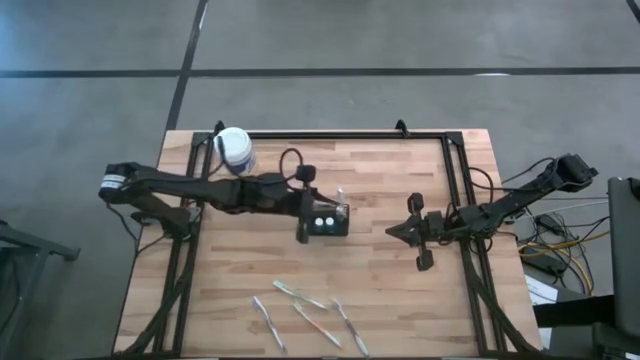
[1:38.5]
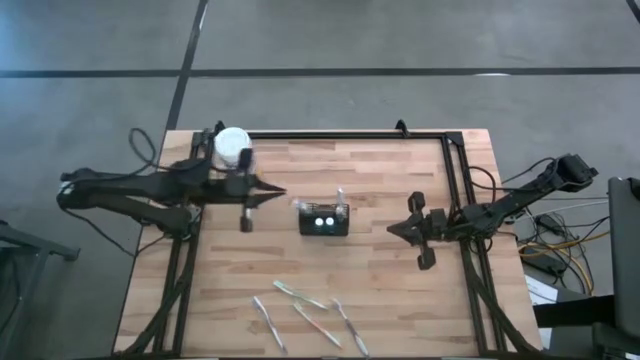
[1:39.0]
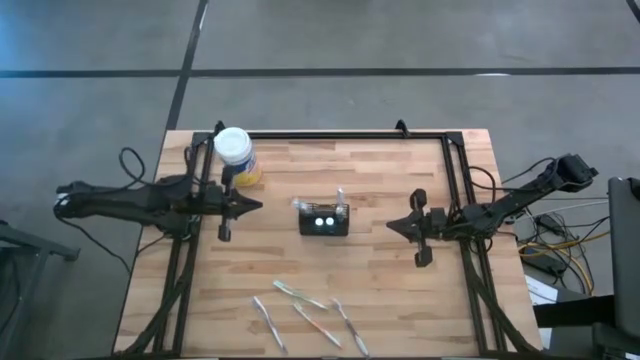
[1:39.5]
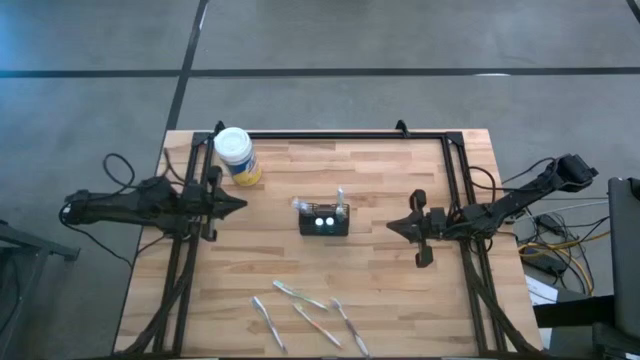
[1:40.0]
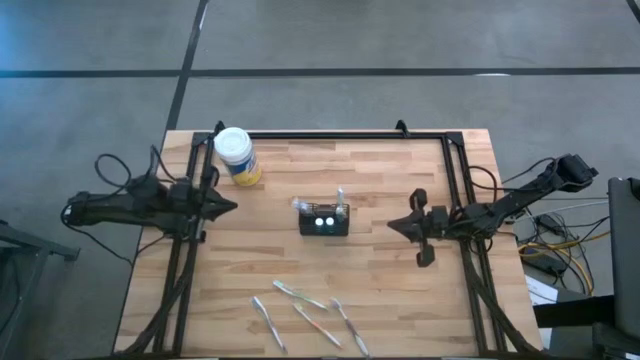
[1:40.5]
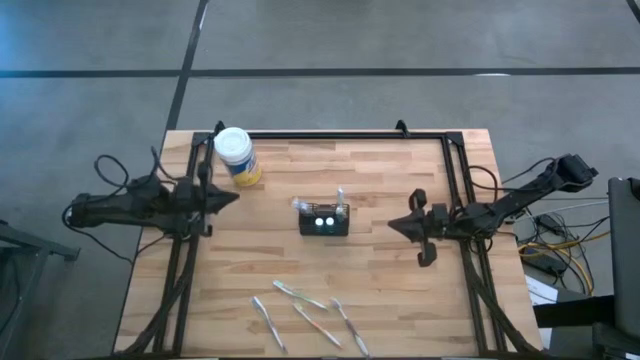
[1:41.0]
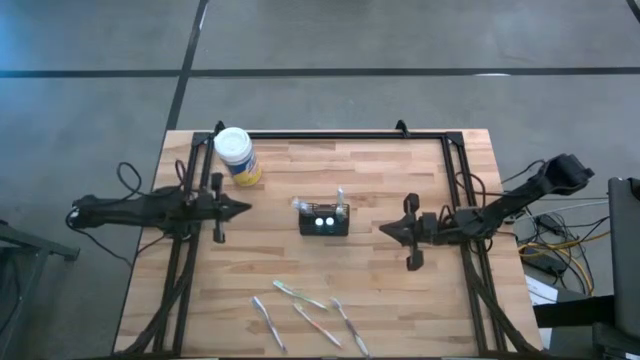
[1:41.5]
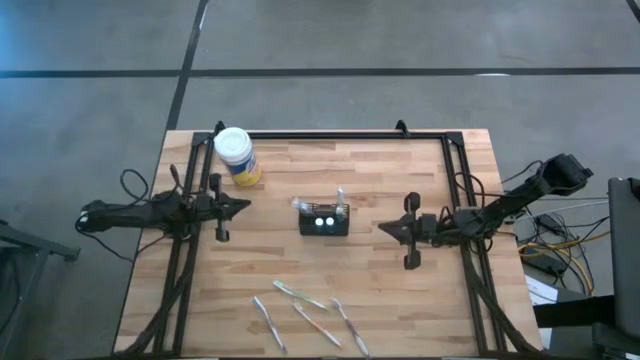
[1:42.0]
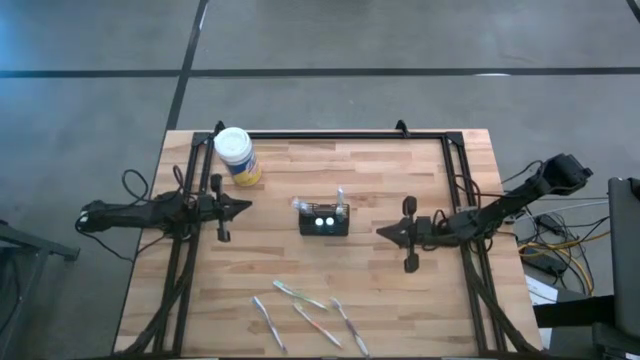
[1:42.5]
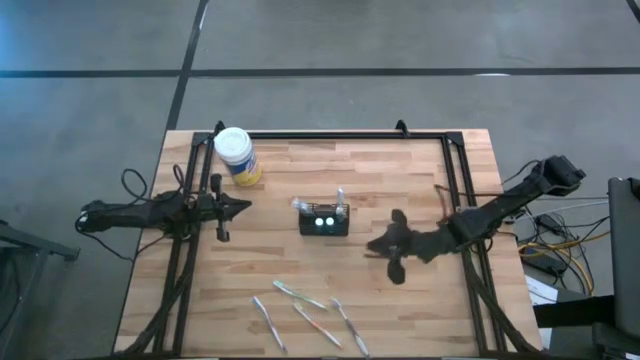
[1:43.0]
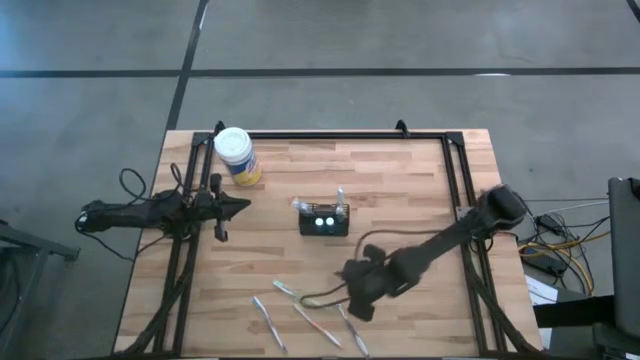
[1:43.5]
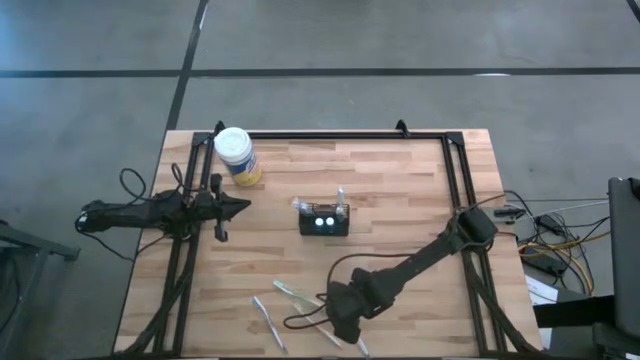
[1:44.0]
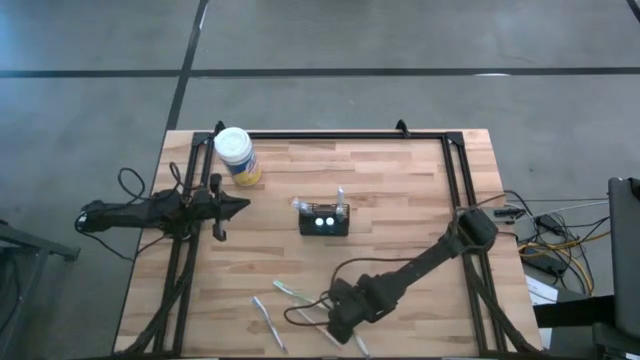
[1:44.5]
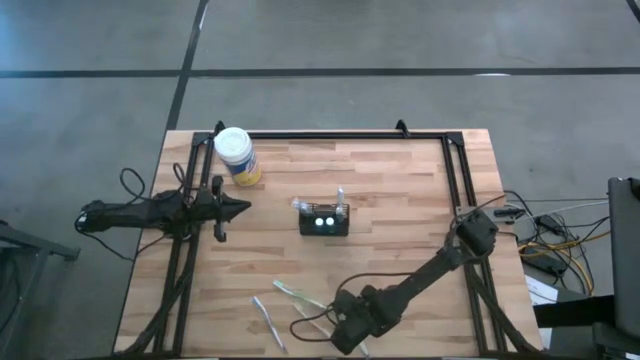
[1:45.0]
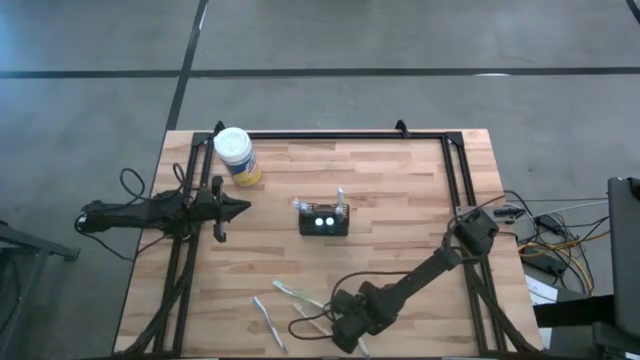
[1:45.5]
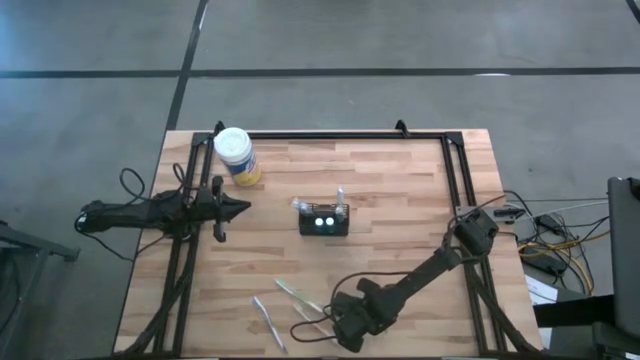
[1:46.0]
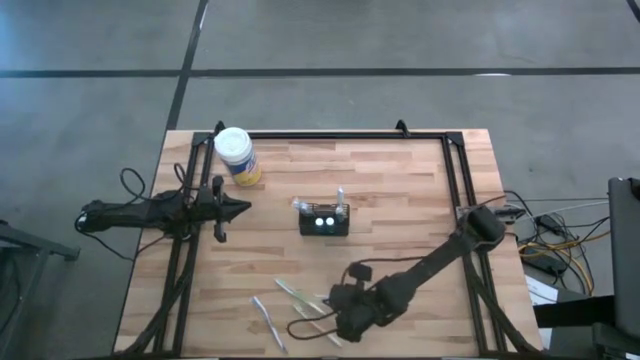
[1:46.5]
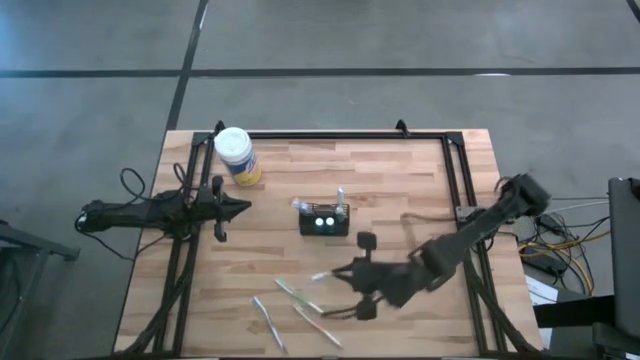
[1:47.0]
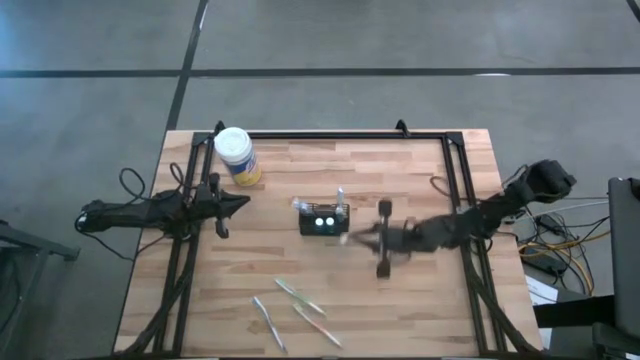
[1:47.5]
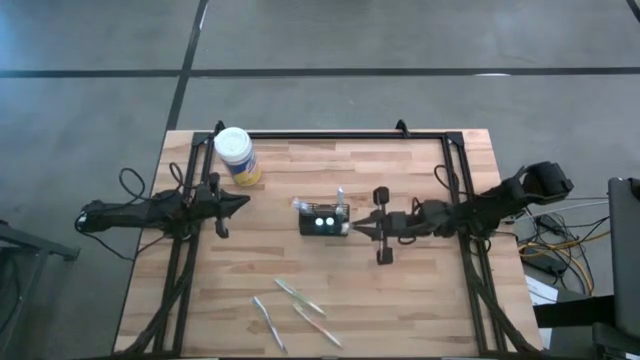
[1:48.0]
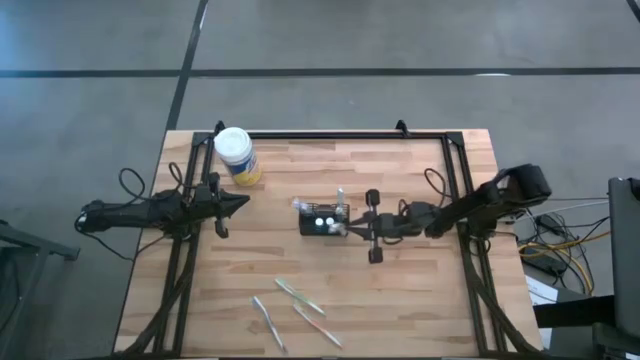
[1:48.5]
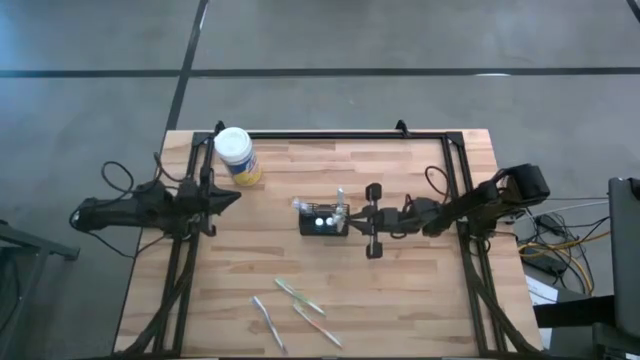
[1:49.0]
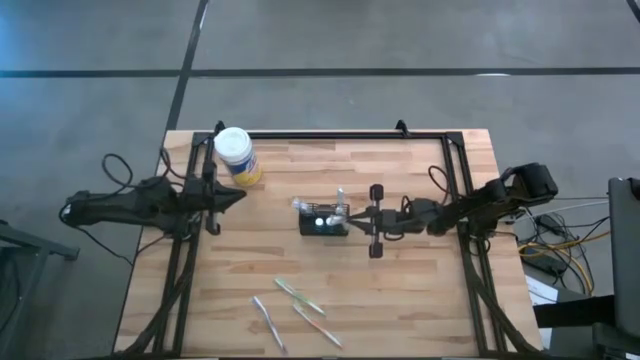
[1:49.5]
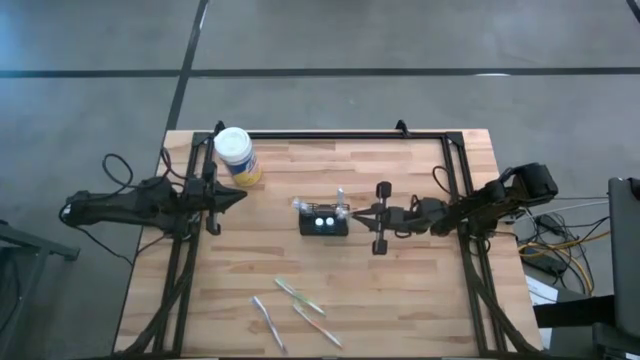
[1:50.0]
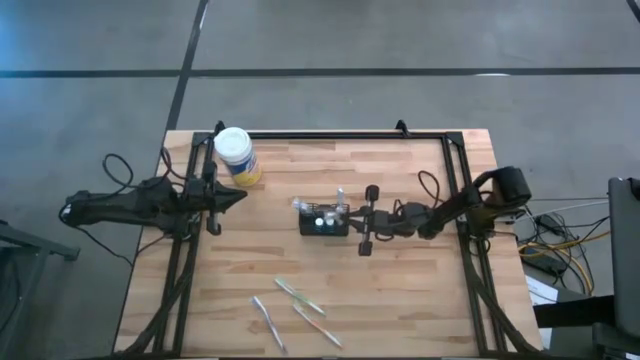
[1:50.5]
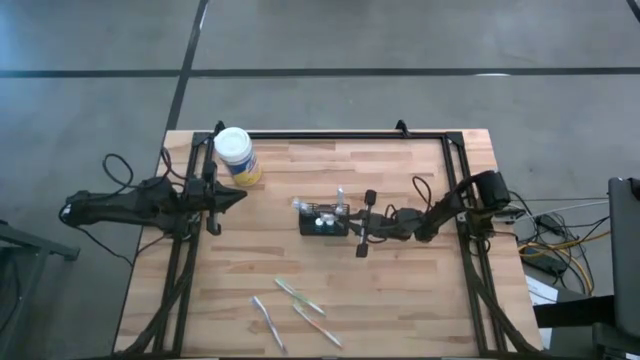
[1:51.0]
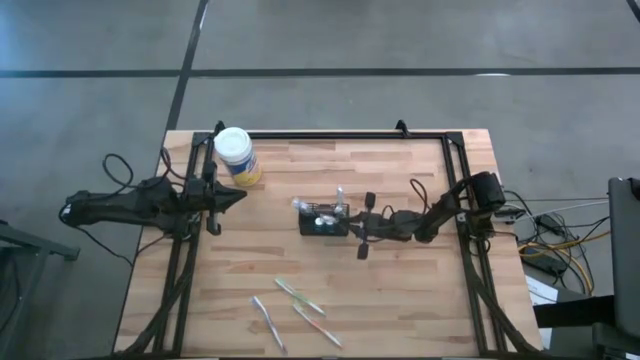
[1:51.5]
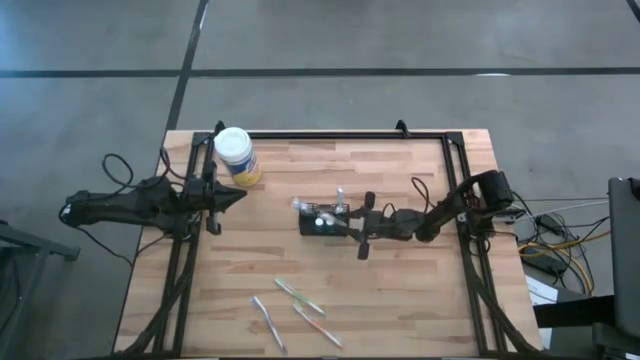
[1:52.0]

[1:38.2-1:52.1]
Task: Pick & Place toothbrushing station
Put the right violet toothbrush into the mesh organizer

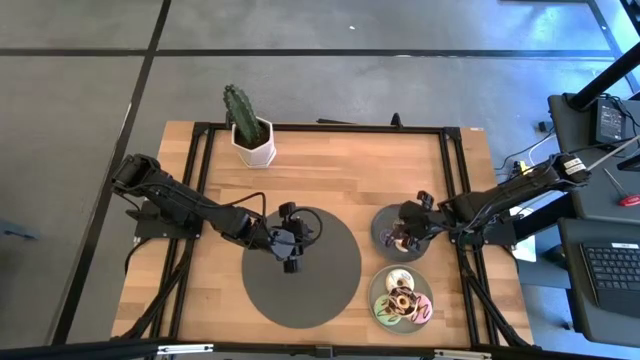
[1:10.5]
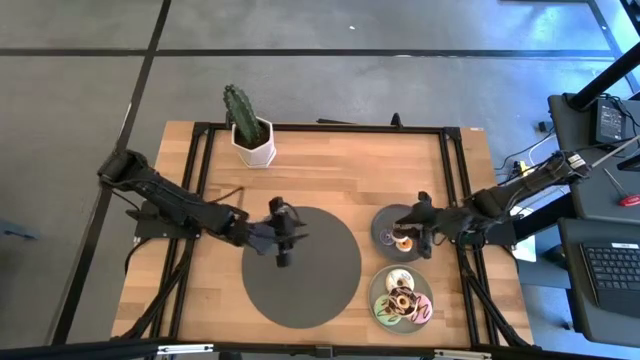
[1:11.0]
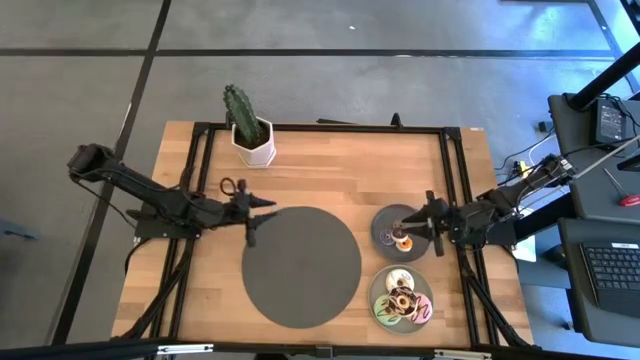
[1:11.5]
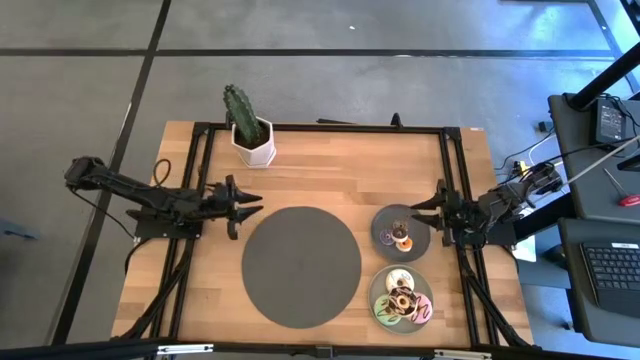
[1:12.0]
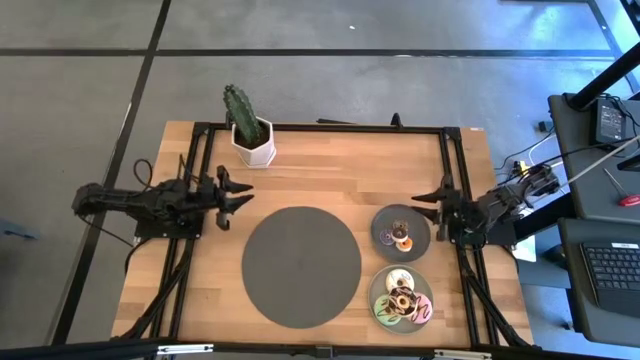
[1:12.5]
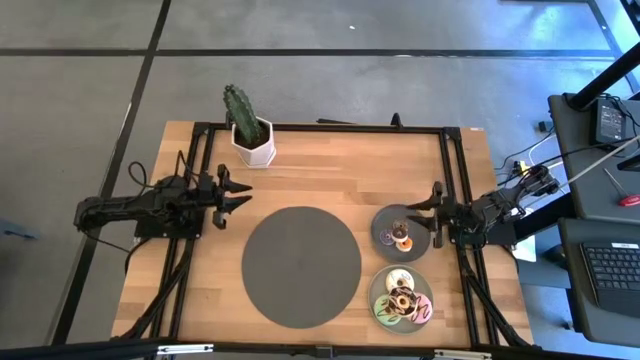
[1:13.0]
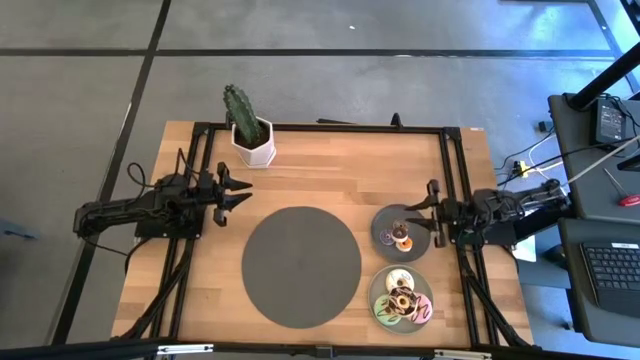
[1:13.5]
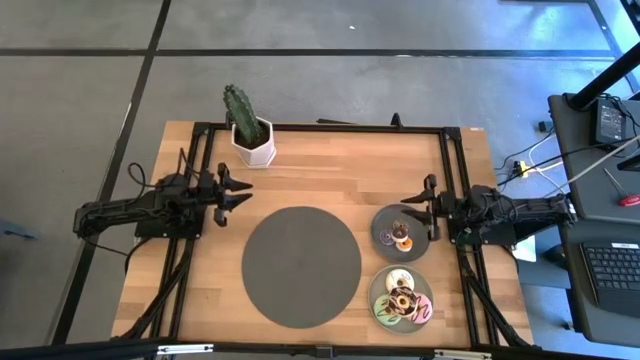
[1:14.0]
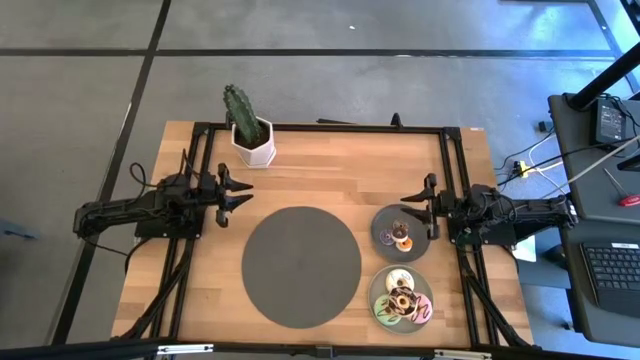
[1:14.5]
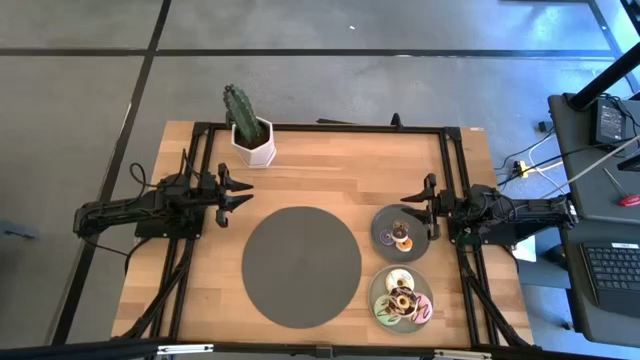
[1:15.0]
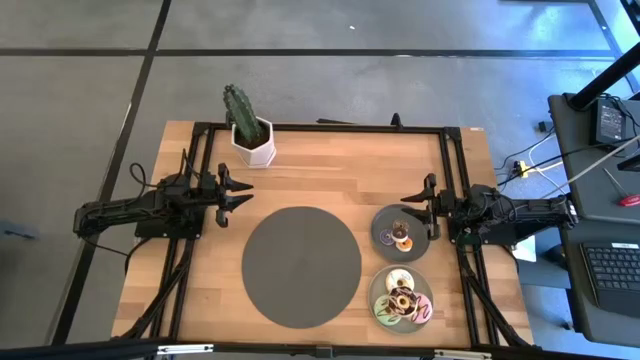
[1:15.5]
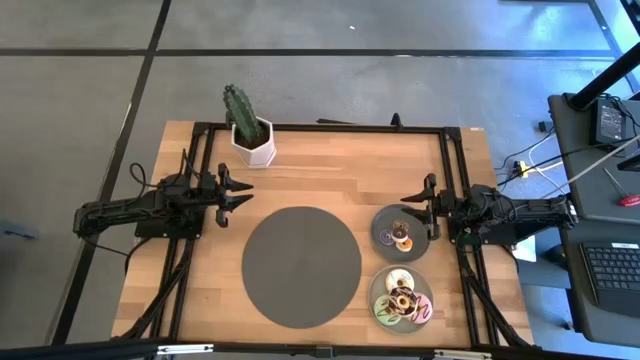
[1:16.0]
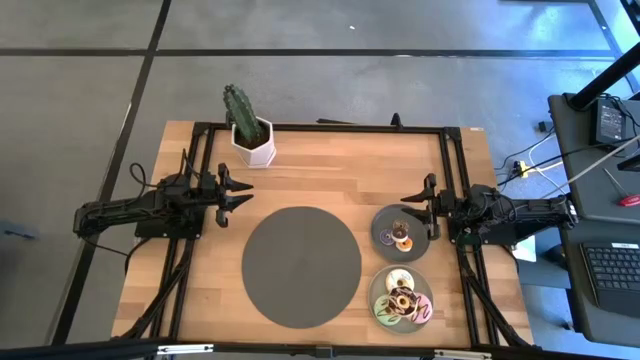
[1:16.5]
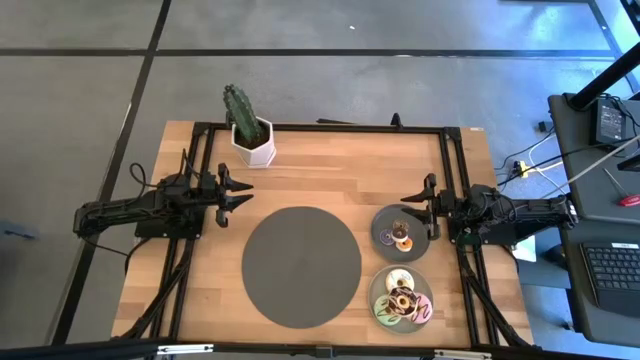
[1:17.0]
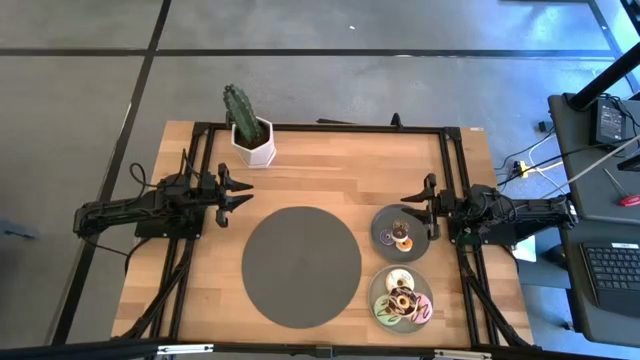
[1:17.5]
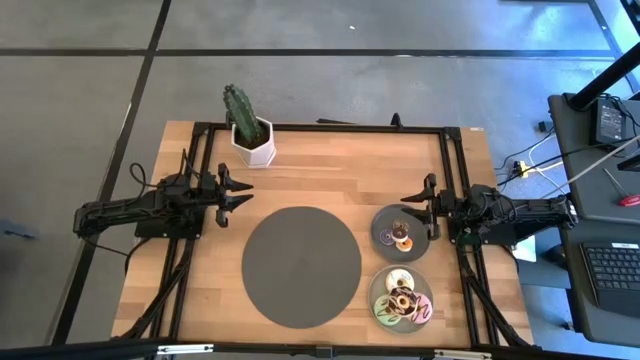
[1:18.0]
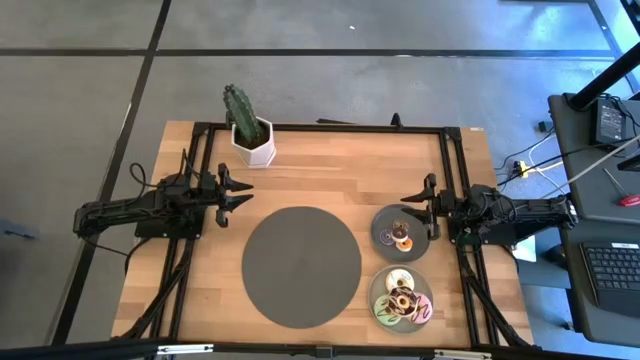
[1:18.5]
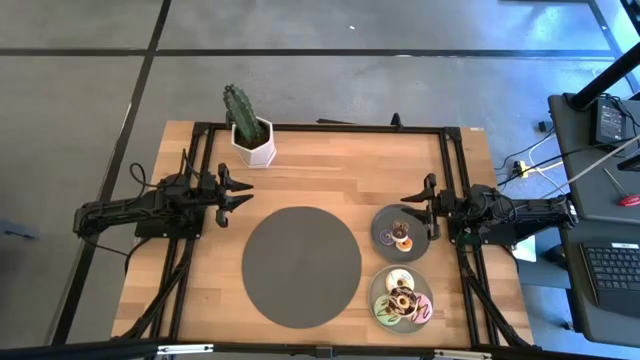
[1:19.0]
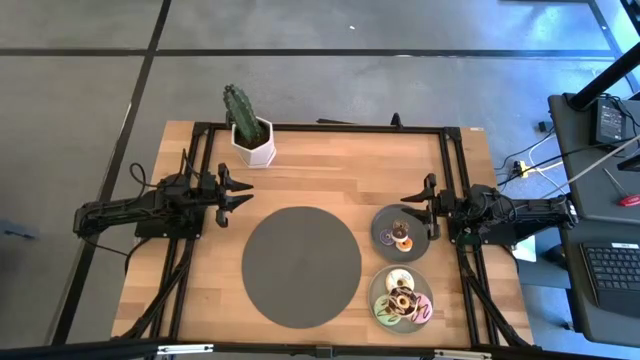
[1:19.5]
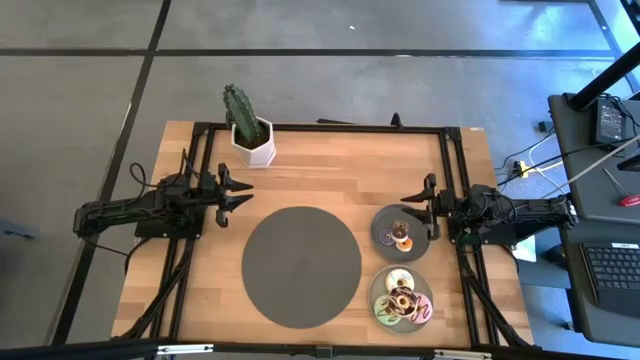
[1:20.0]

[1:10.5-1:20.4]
Task: Pick & Place donuts
Return to Home Position
